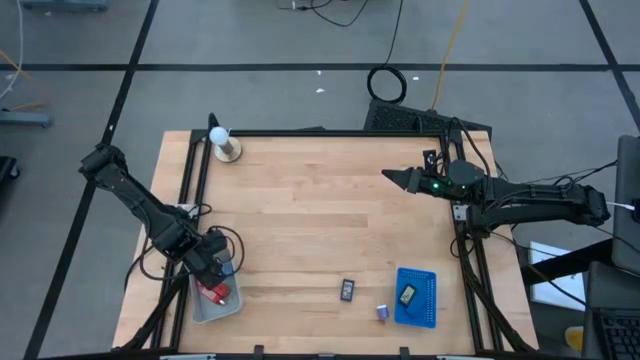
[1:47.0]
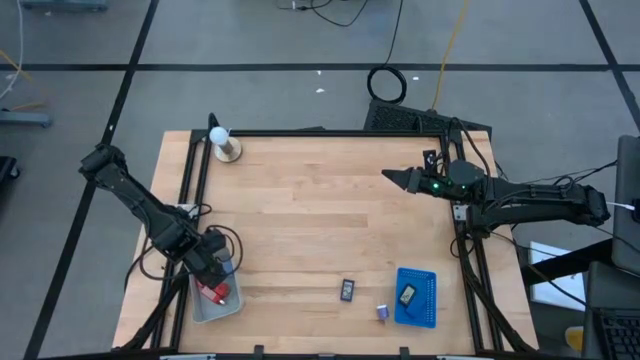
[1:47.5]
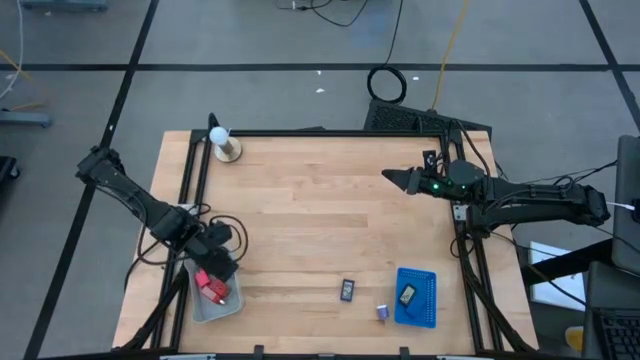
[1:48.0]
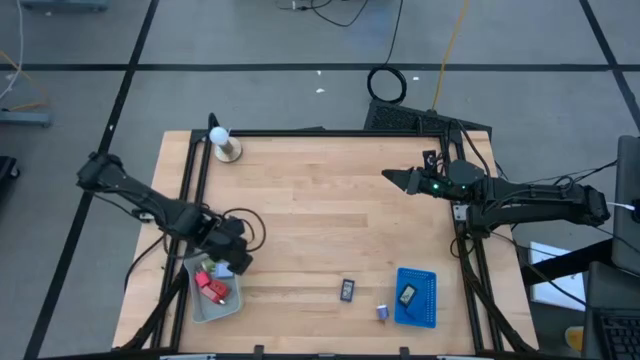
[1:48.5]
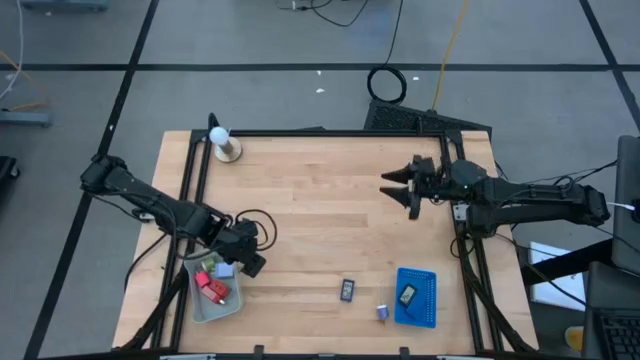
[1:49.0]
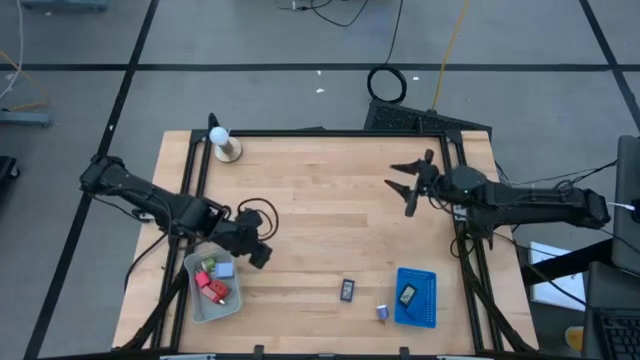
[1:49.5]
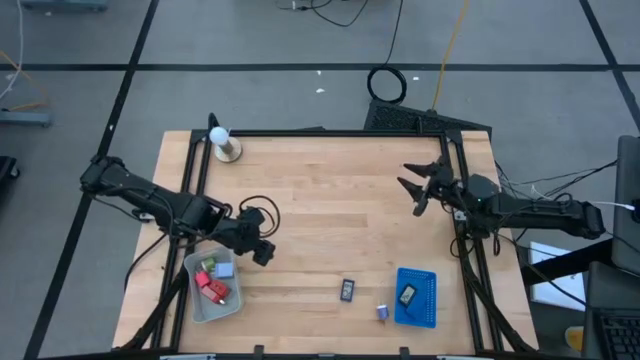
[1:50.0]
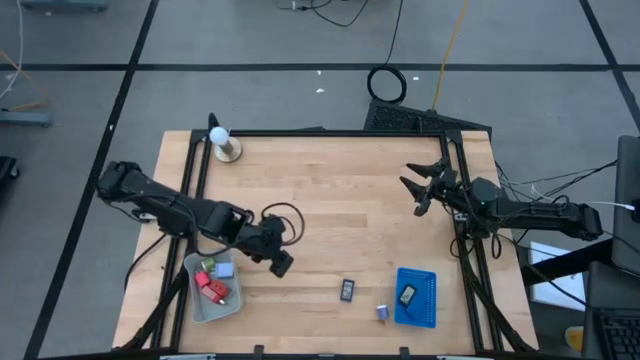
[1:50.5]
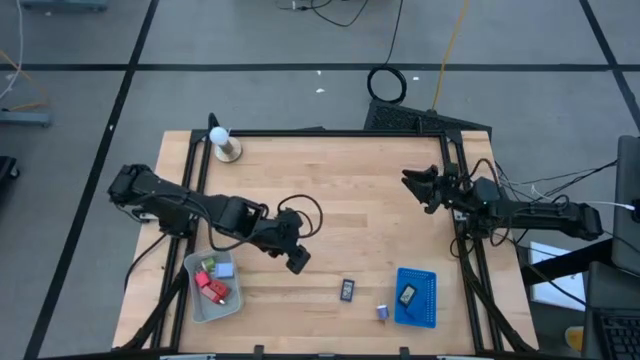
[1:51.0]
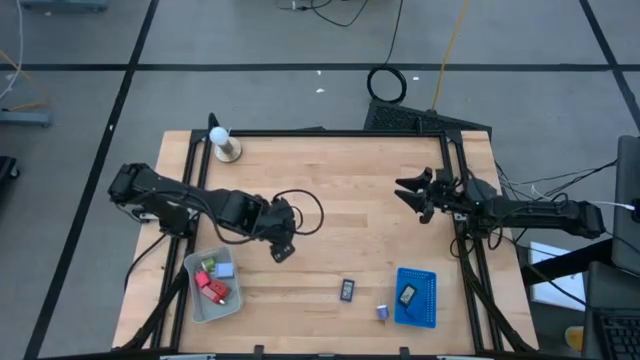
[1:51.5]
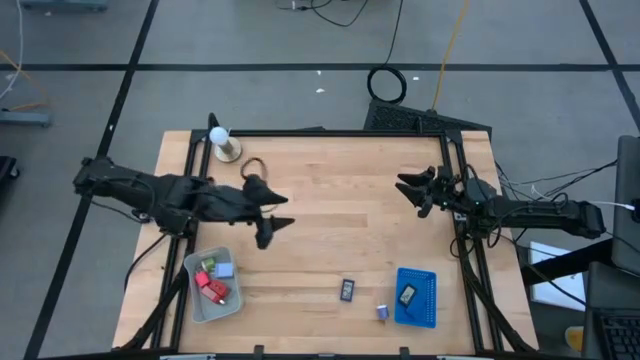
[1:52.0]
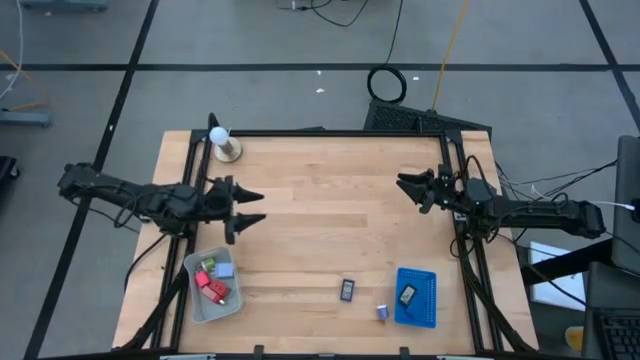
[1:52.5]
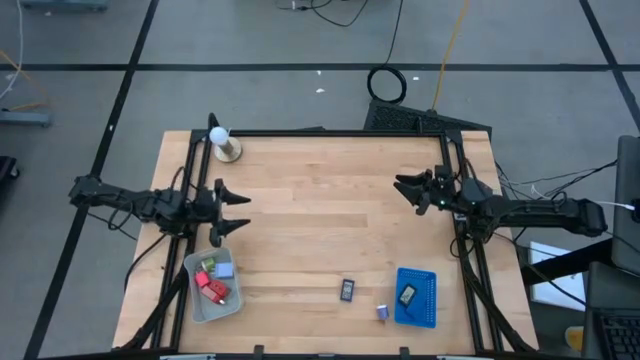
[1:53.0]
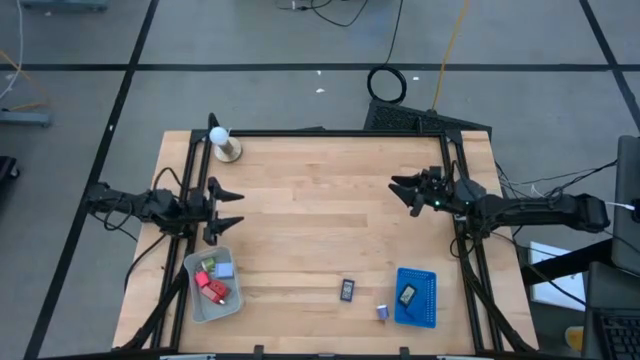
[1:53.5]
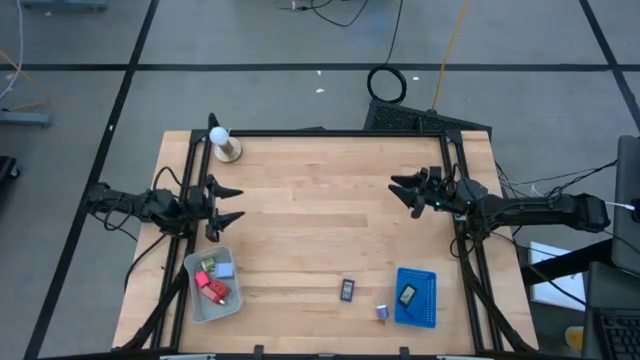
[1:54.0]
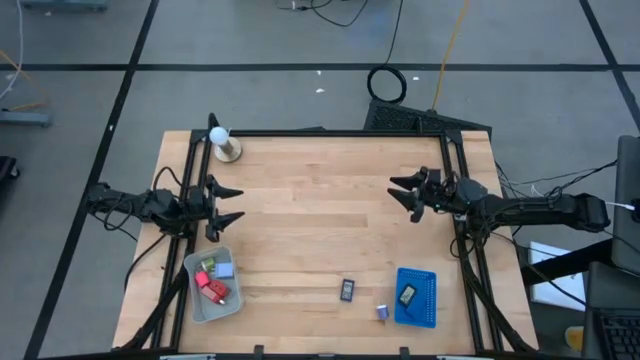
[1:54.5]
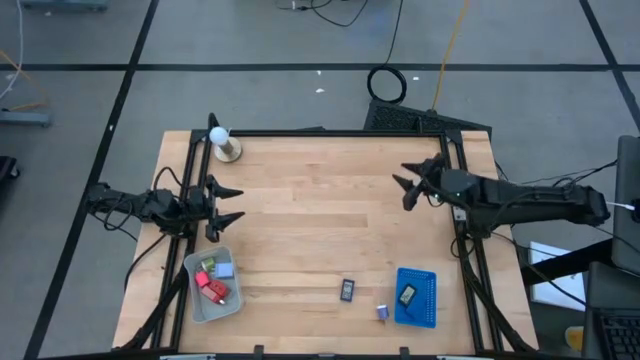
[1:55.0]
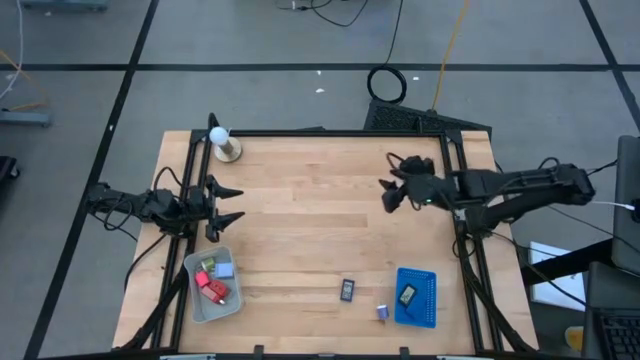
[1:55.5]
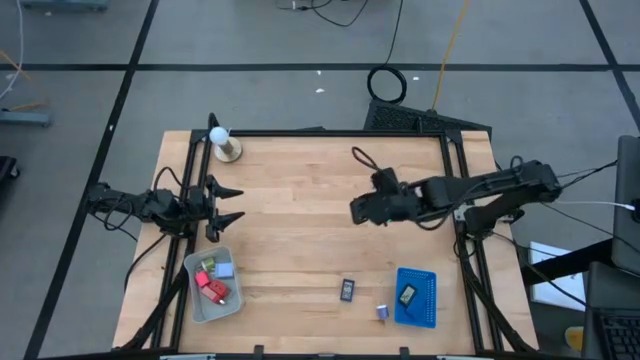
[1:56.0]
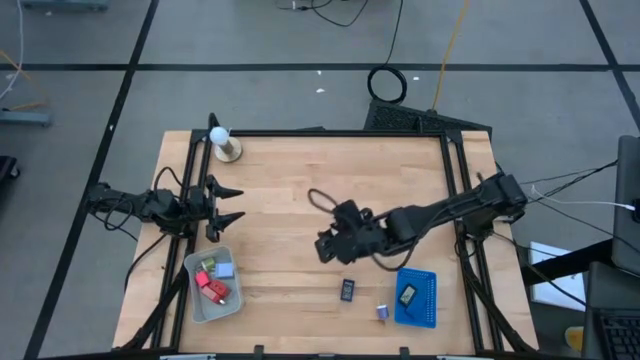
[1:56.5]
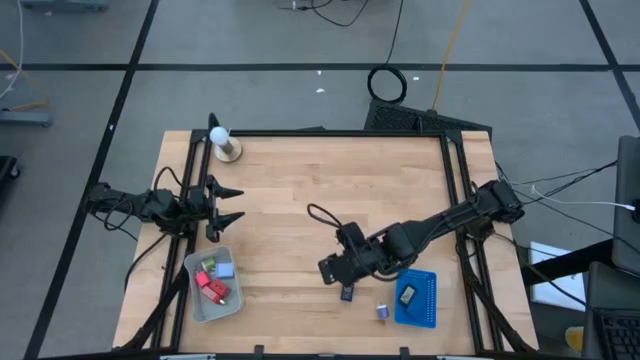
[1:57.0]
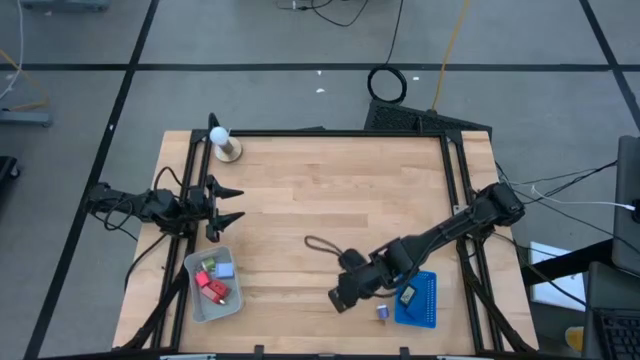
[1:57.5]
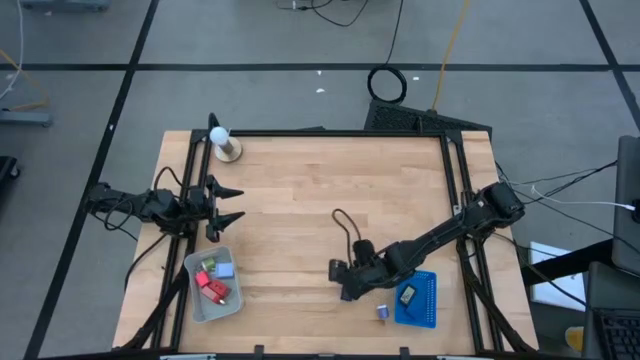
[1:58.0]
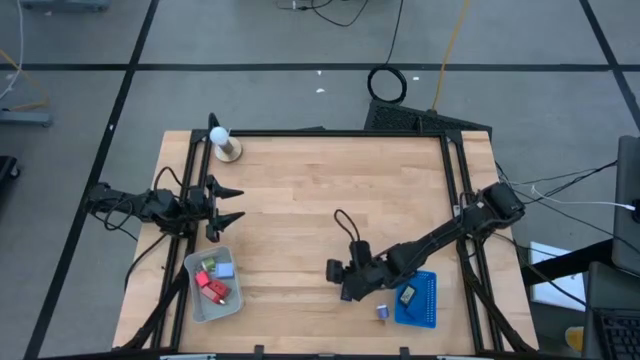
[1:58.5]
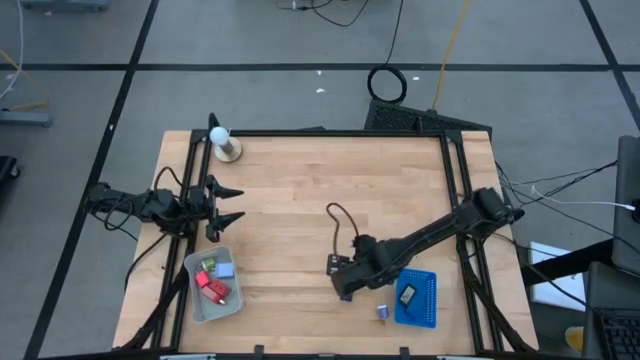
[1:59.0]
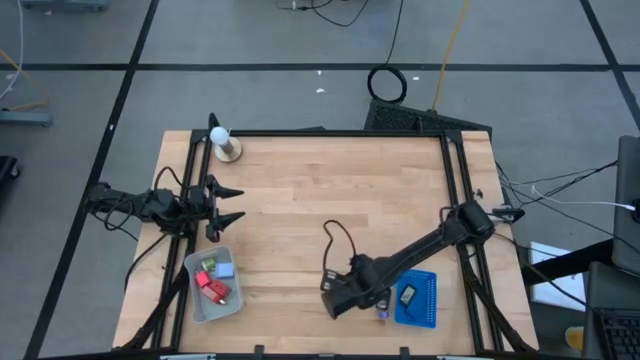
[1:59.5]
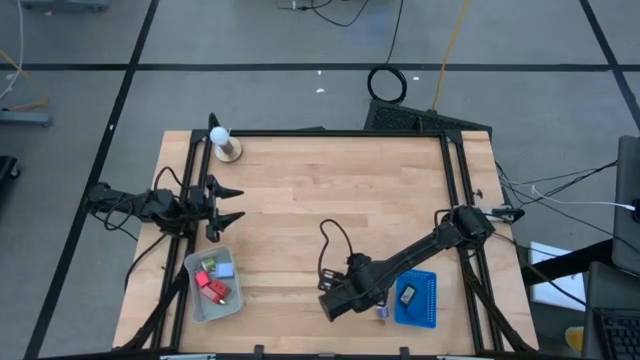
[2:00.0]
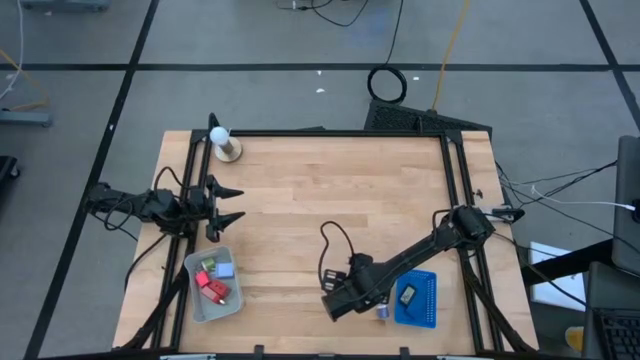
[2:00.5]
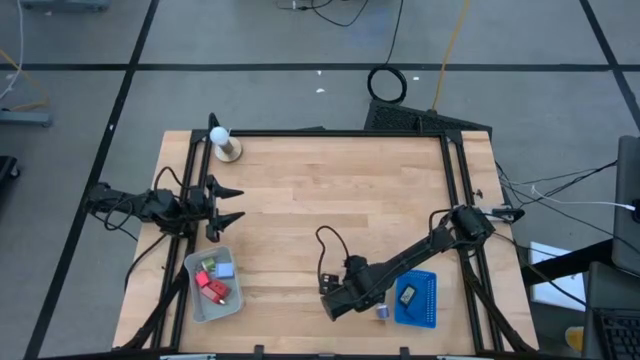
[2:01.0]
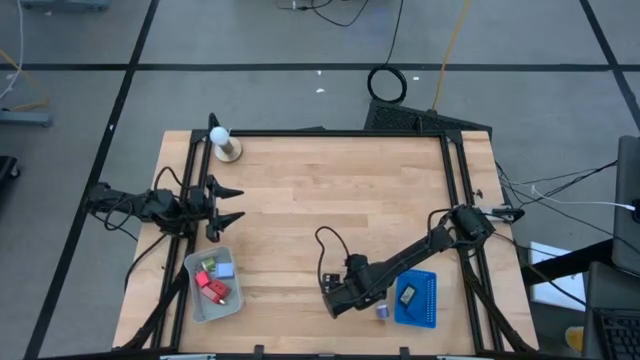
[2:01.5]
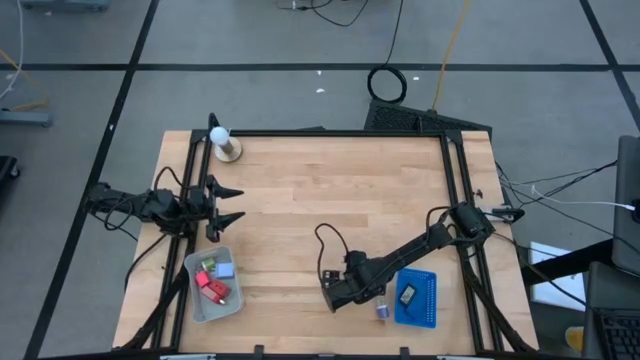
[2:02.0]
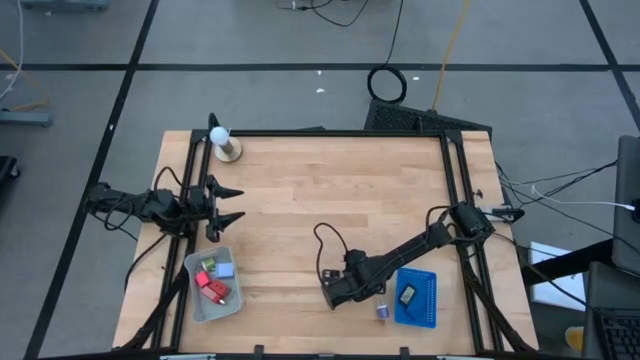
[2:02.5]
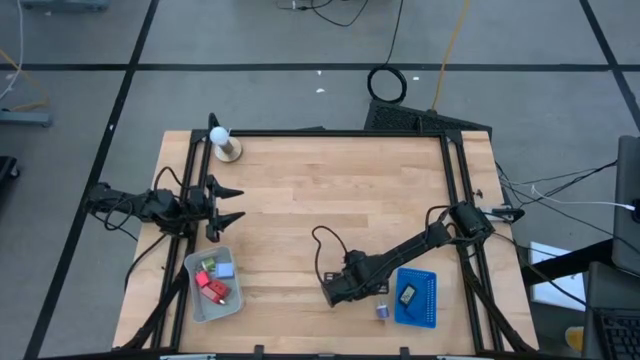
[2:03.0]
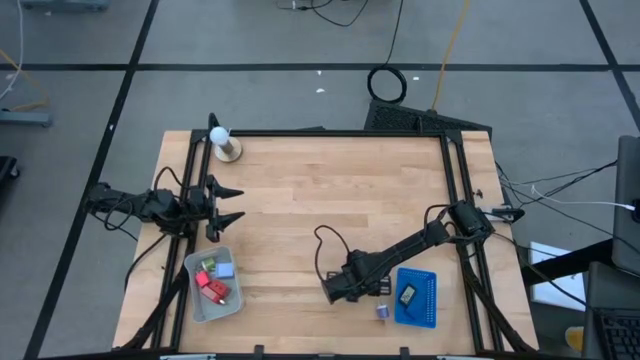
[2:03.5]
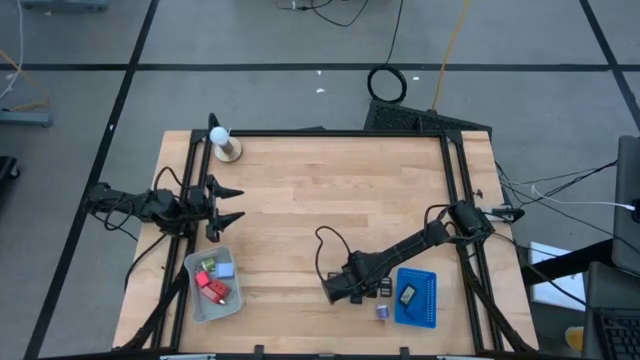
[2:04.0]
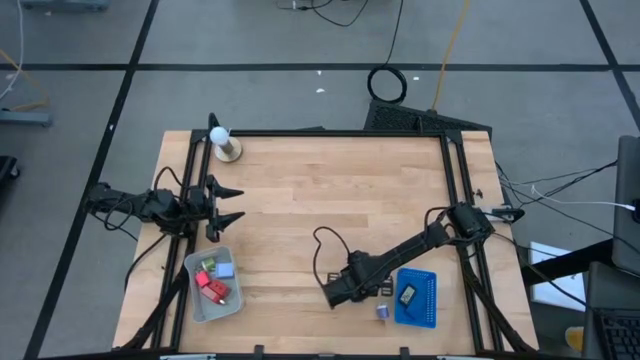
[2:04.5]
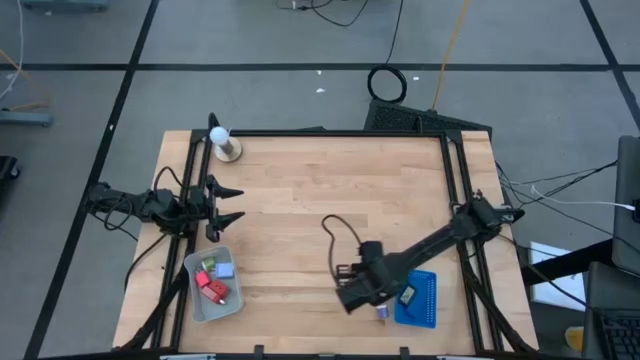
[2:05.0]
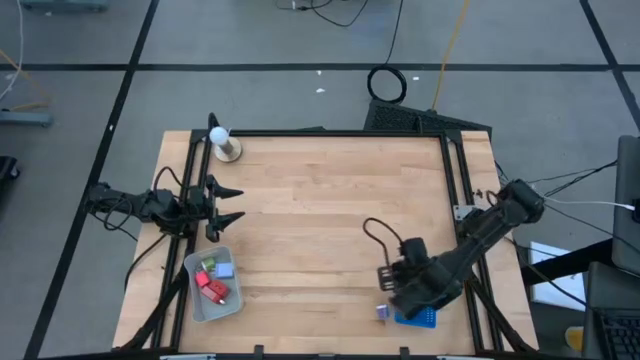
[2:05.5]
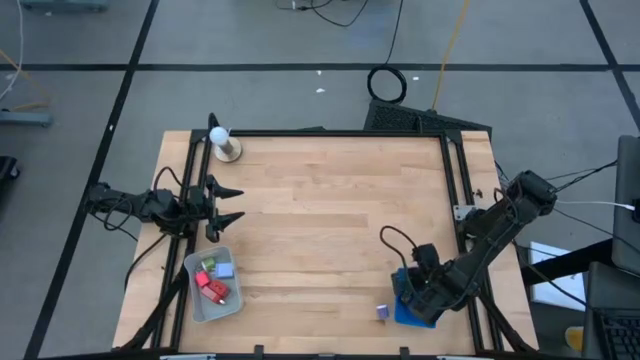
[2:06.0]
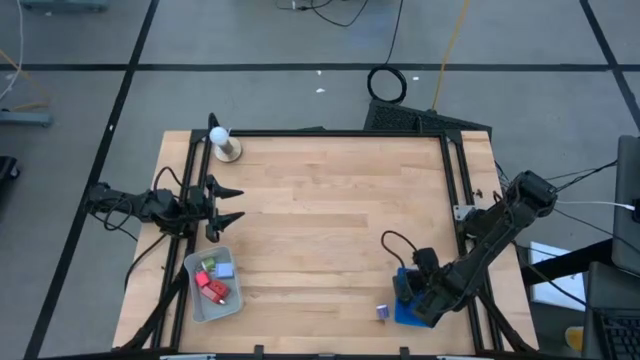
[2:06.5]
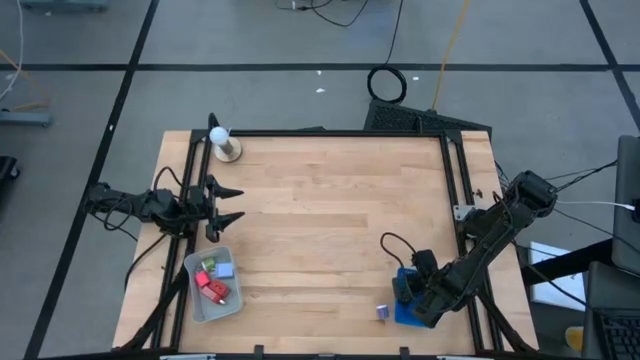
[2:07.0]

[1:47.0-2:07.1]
Task: Pick & Place Office items
Put the blue mini digital clock into the blue bin

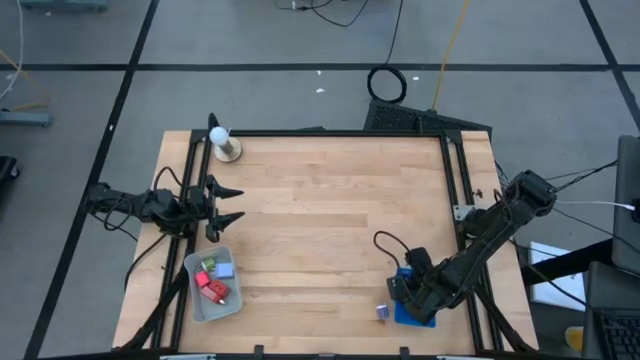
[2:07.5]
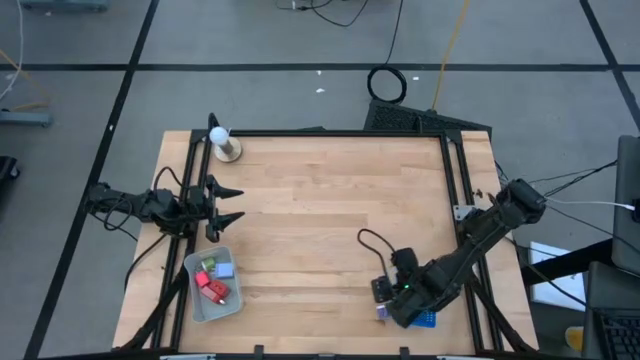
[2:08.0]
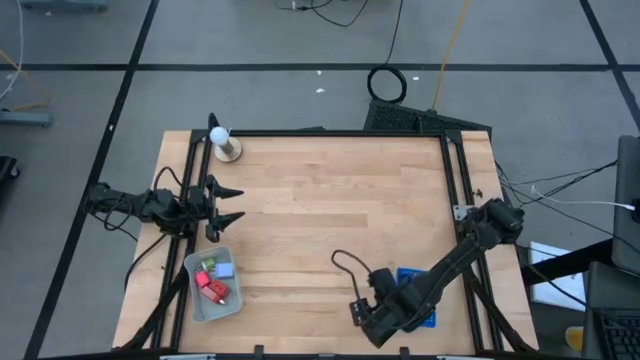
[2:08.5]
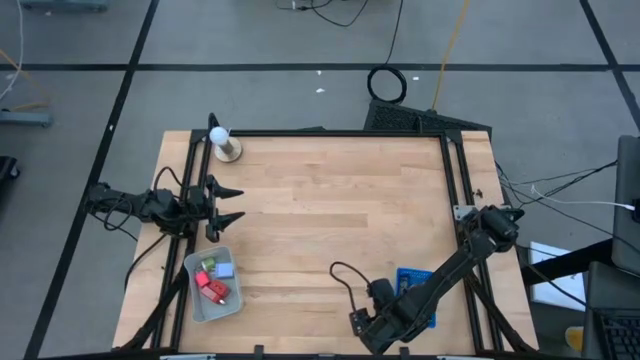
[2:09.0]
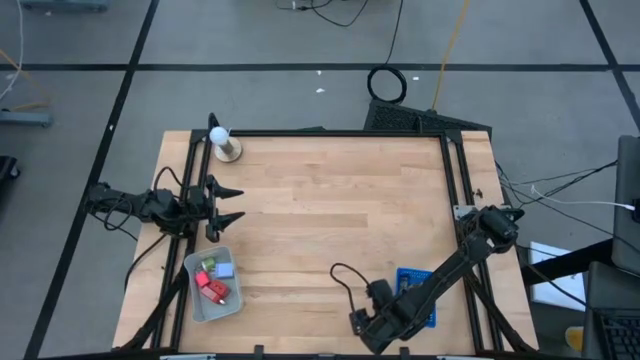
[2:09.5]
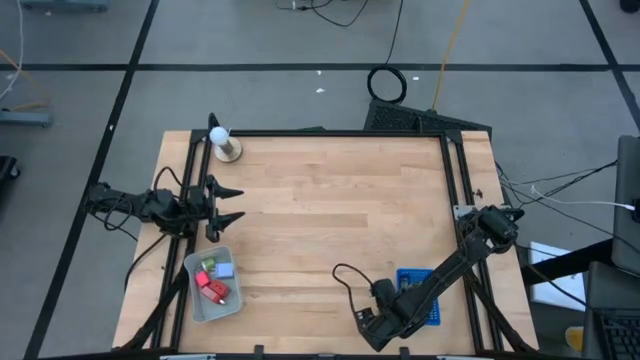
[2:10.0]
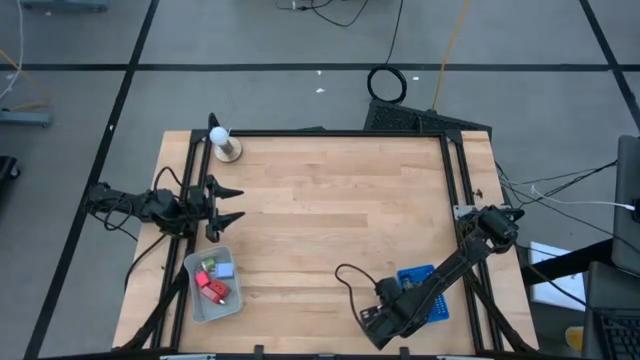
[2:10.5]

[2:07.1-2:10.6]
Move the blue bin to the right
